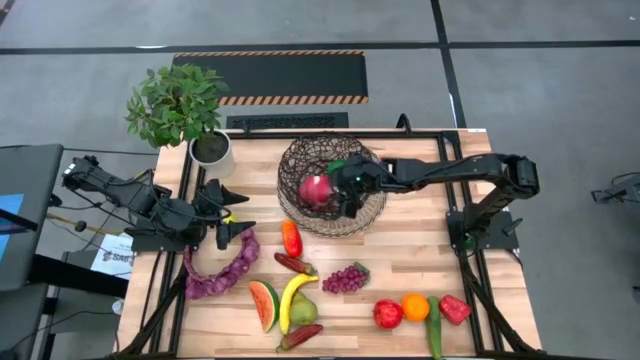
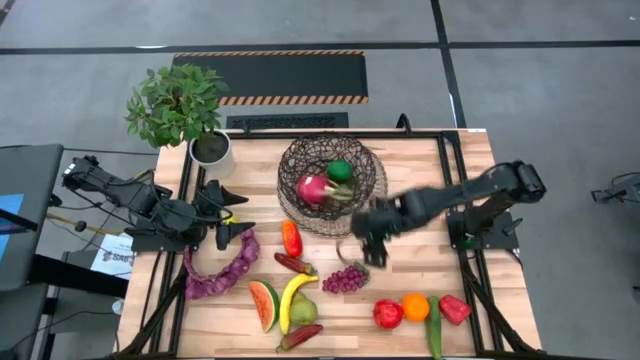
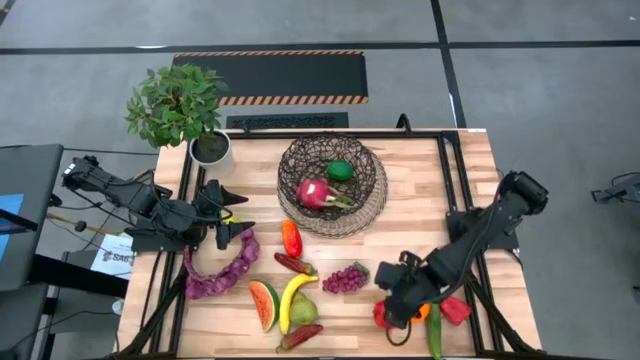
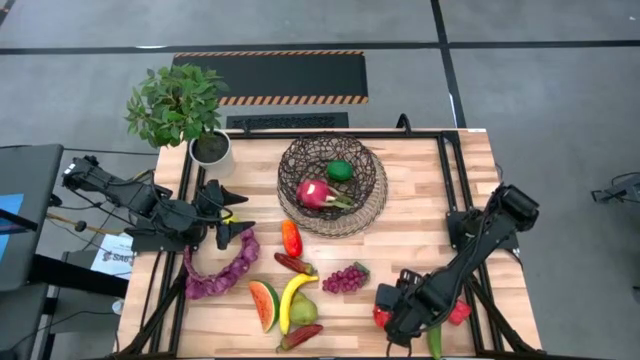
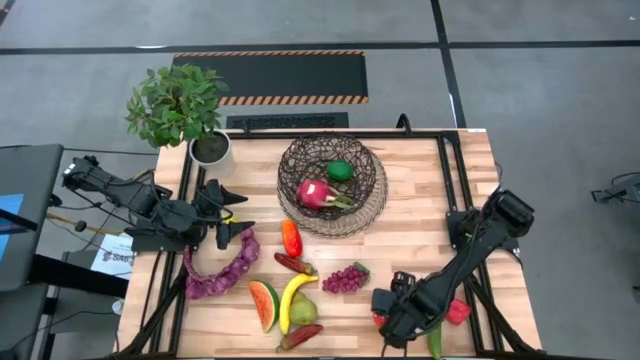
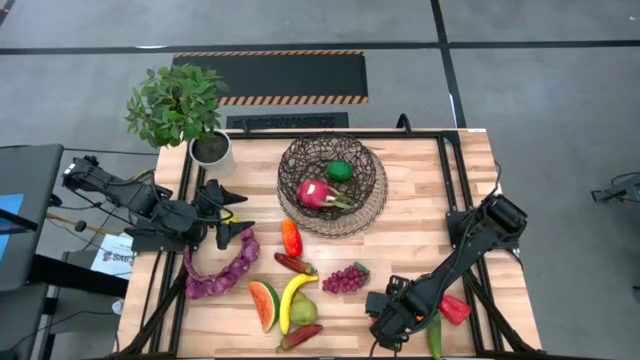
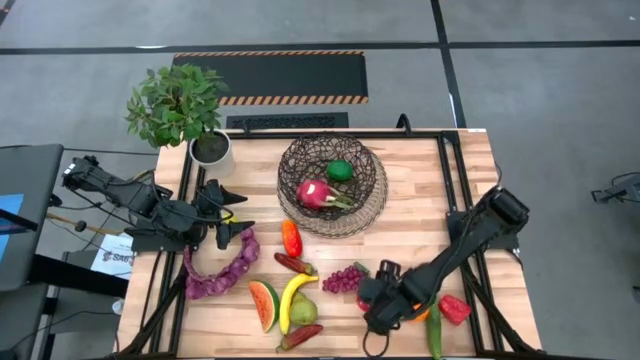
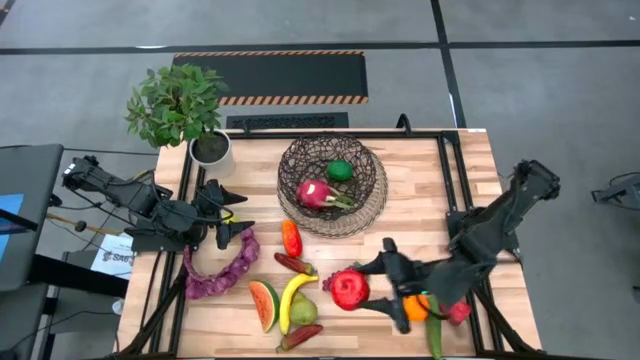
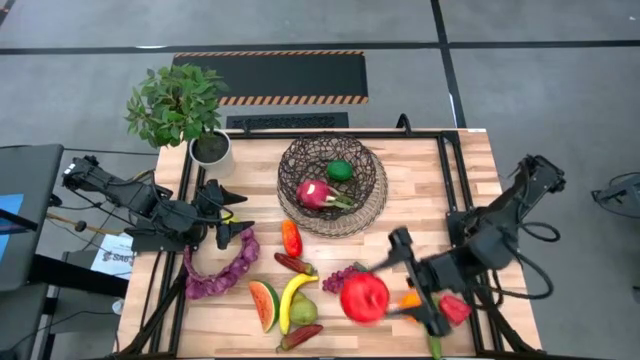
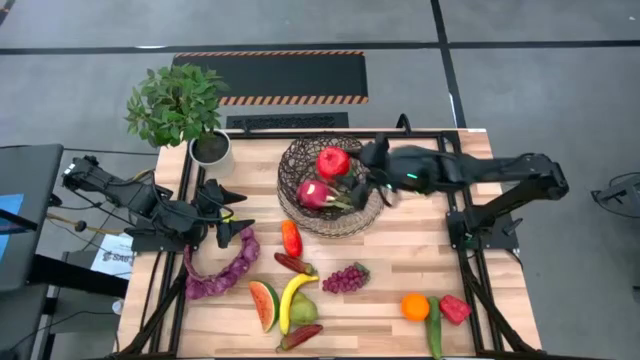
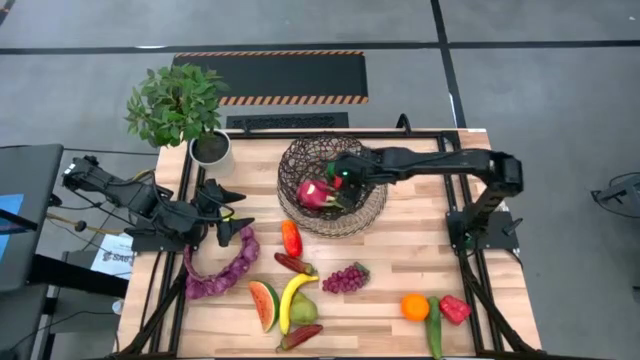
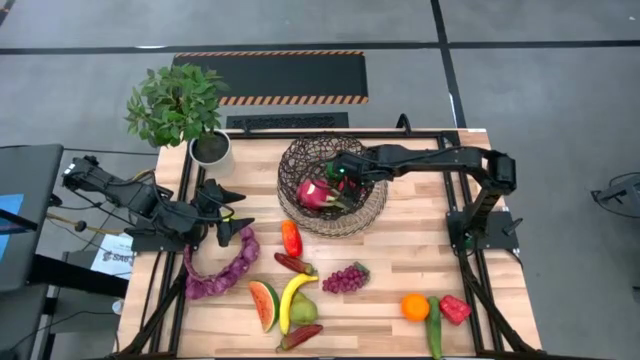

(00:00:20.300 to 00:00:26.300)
Task: Build produce basket
Put the red apple into the basket

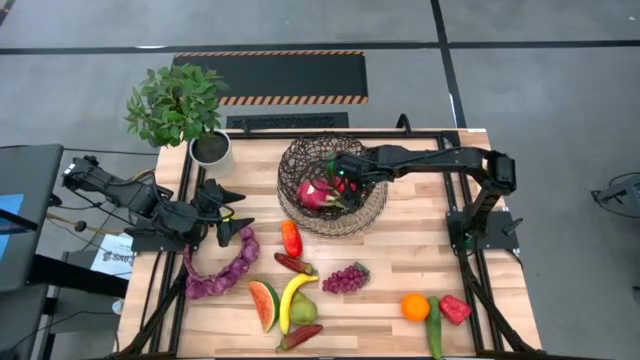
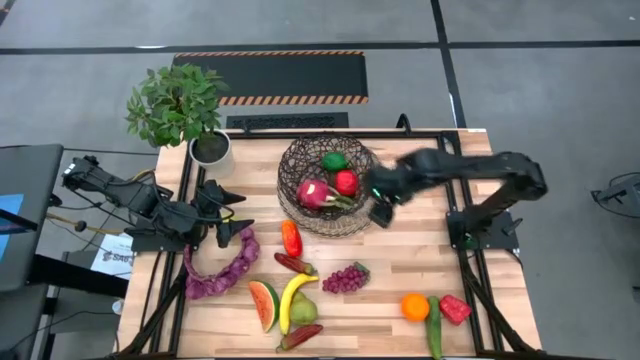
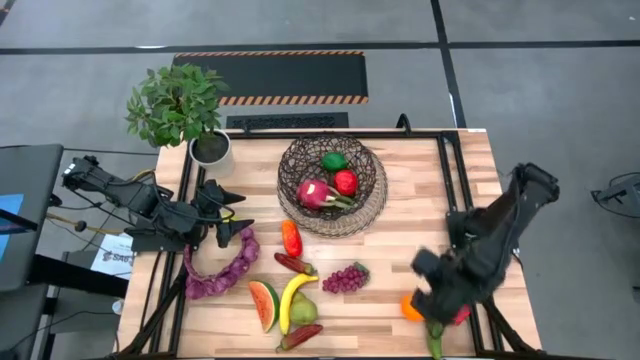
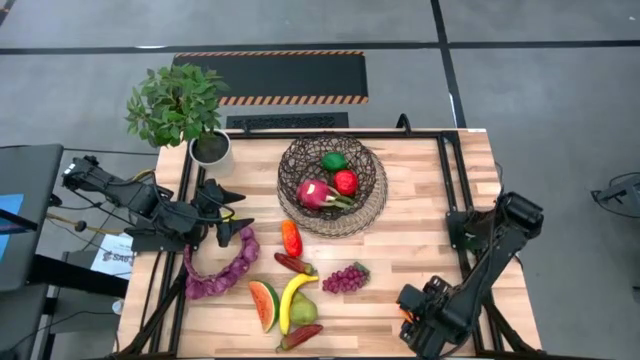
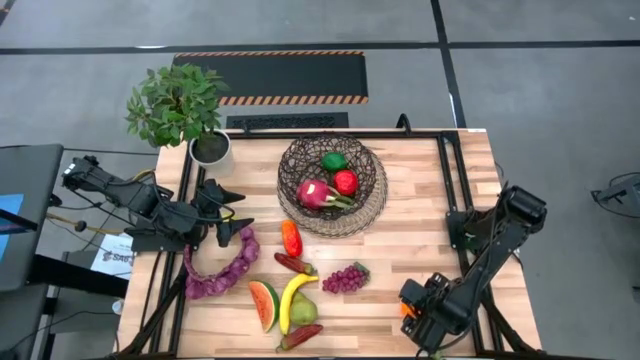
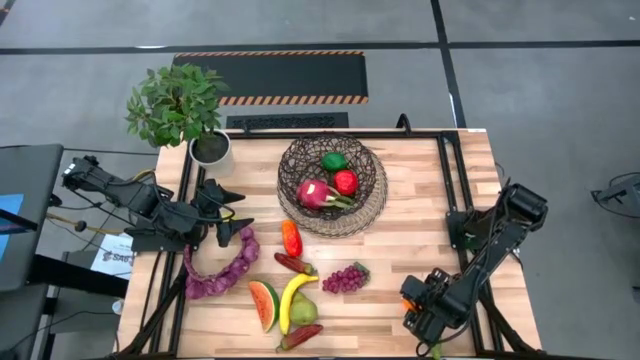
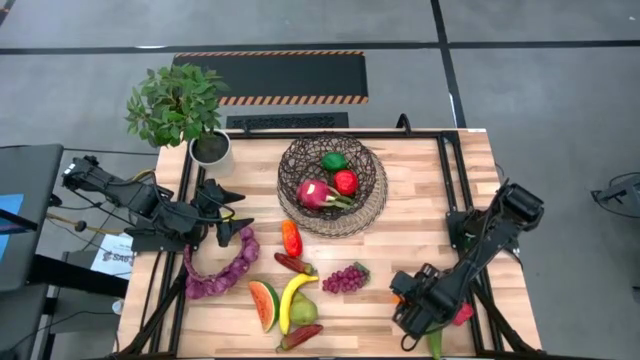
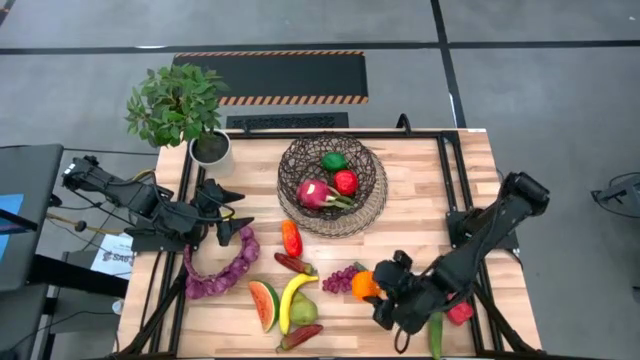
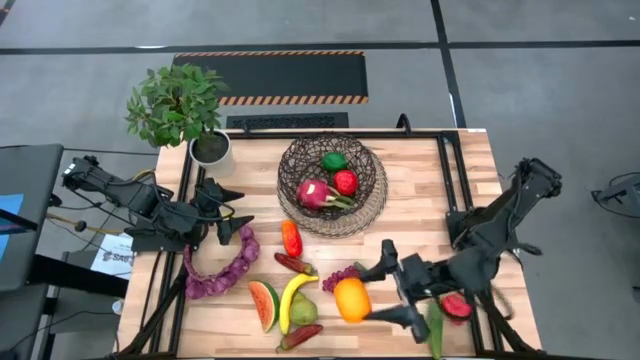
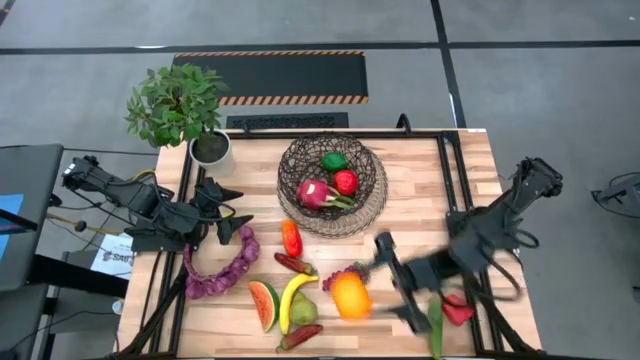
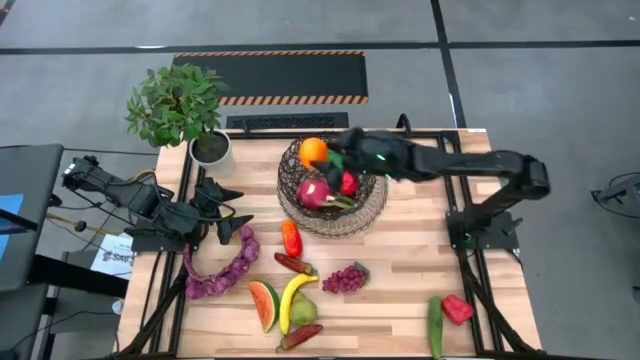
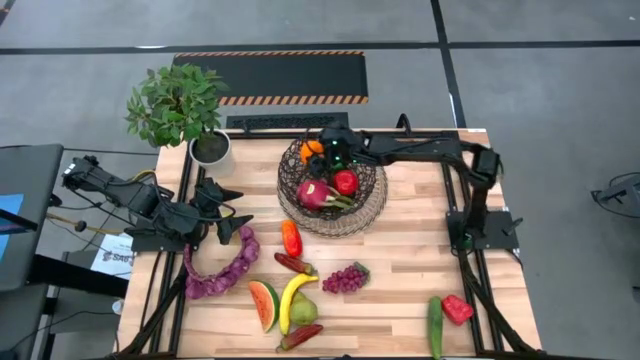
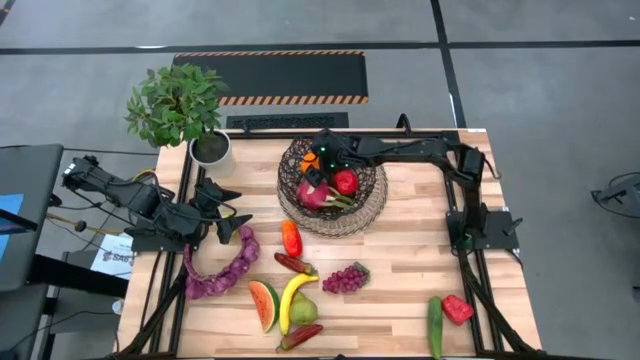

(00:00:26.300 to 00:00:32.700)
Put the orange into the basket

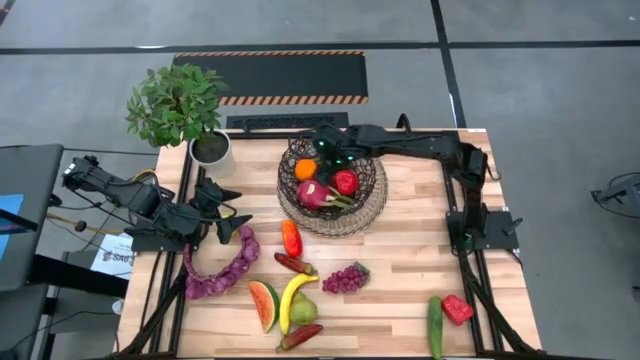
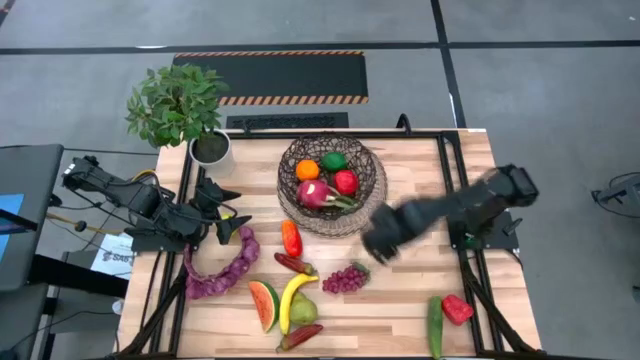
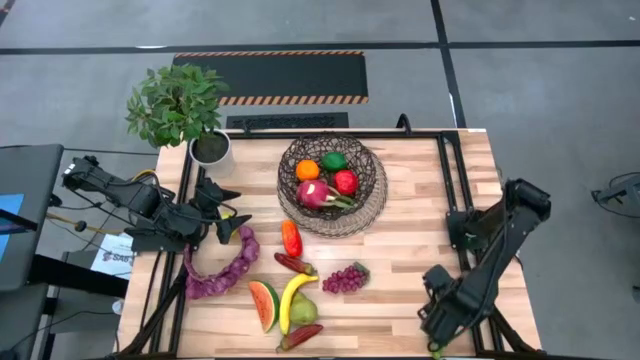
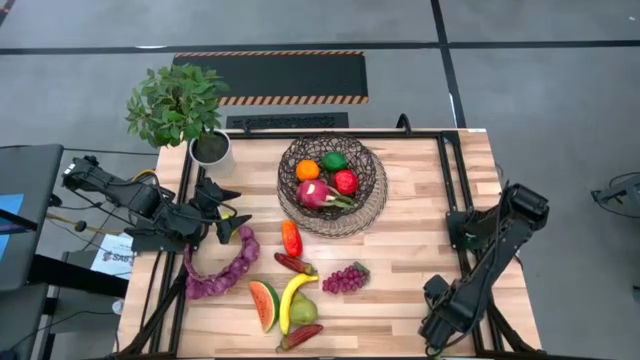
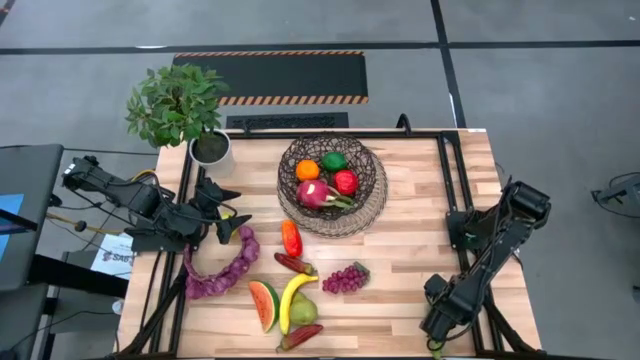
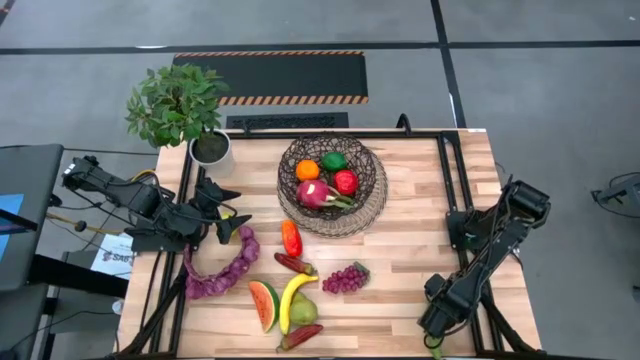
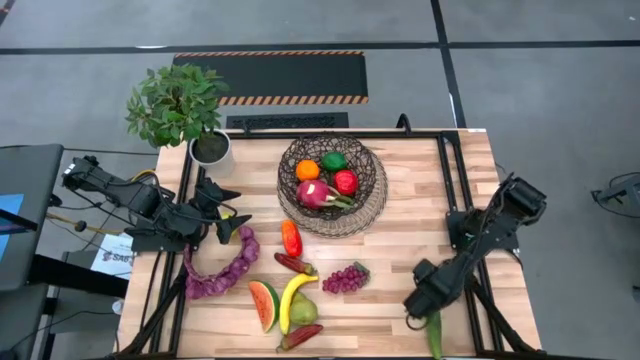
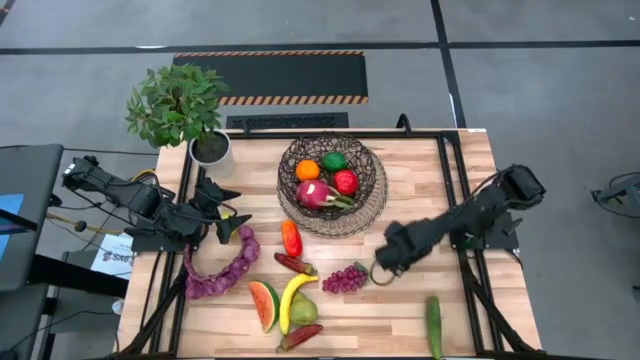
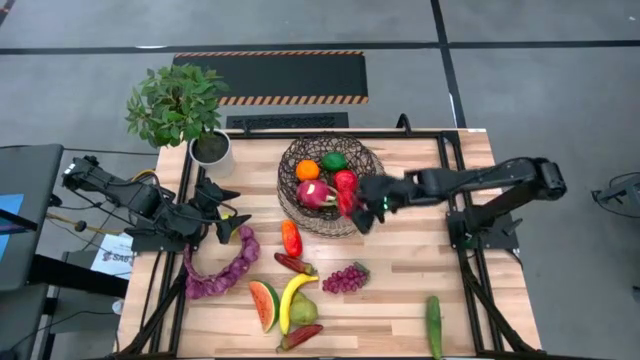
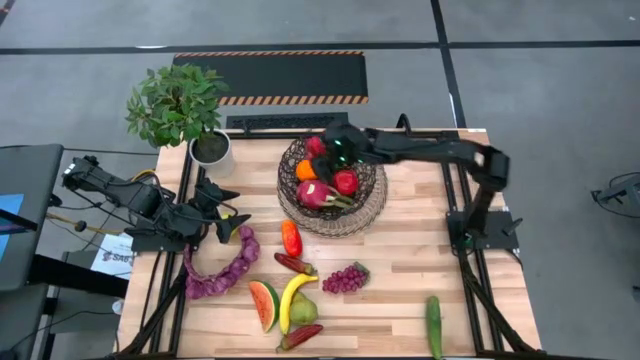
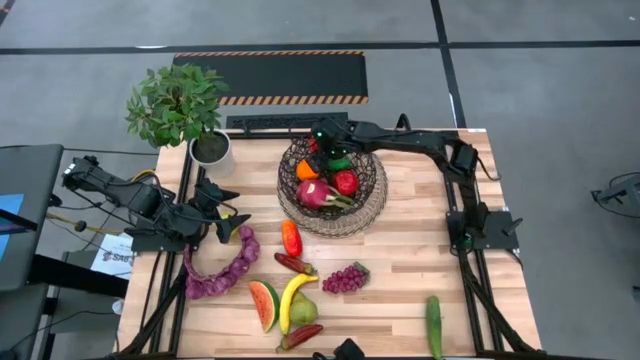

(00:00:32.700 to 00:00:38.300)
Put the bell pepper into the basket

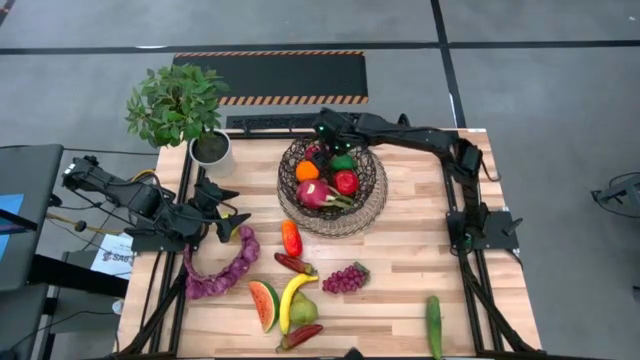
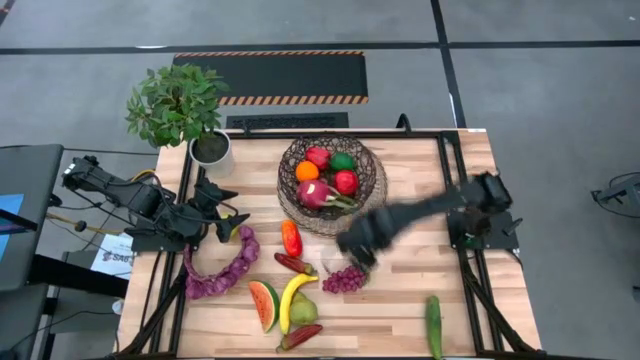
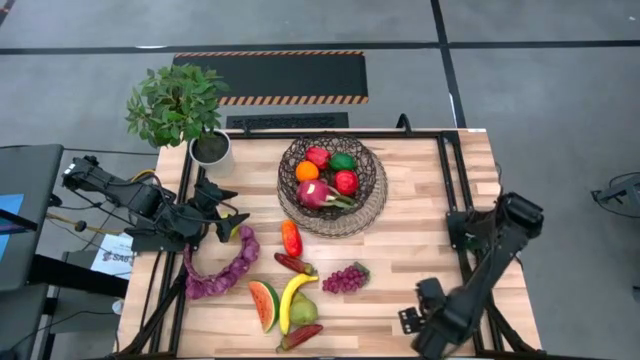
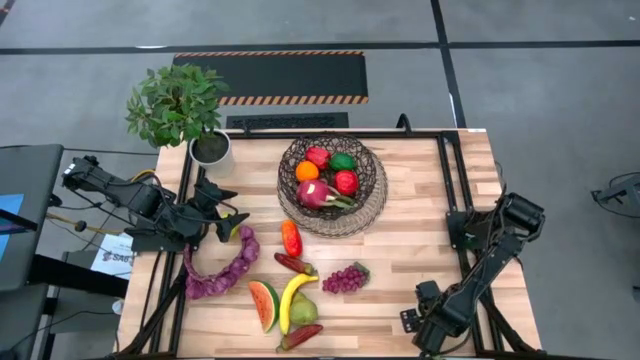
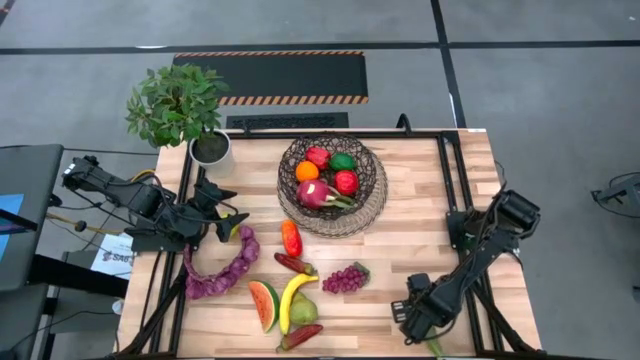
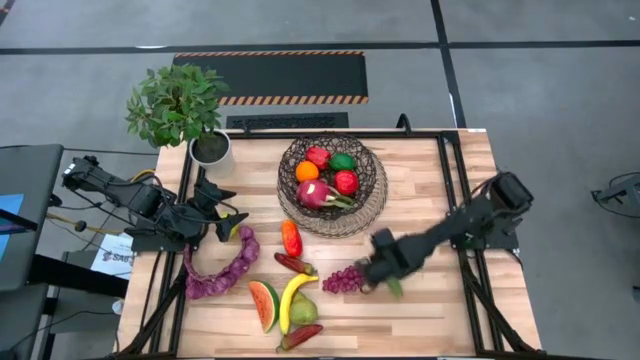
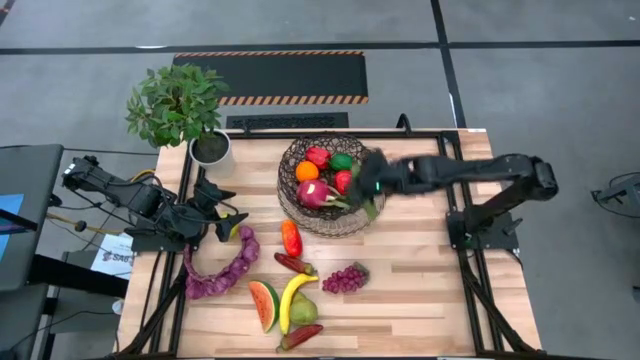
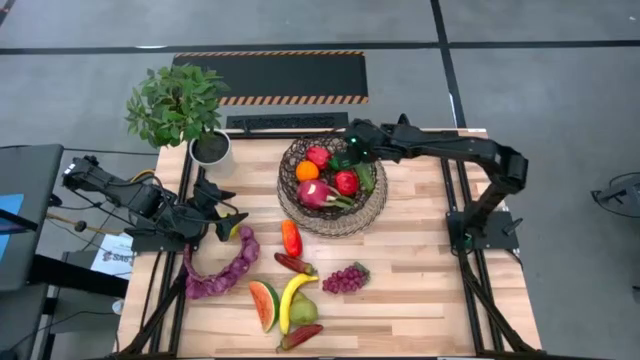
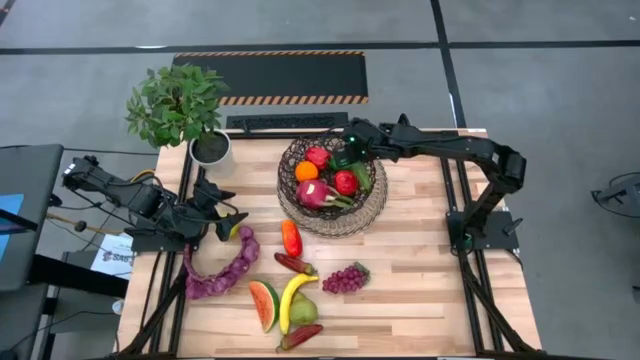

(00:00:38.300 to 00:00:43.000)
Put the cucumber into the basket
